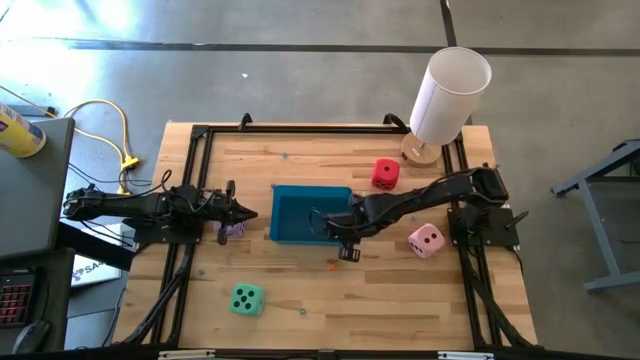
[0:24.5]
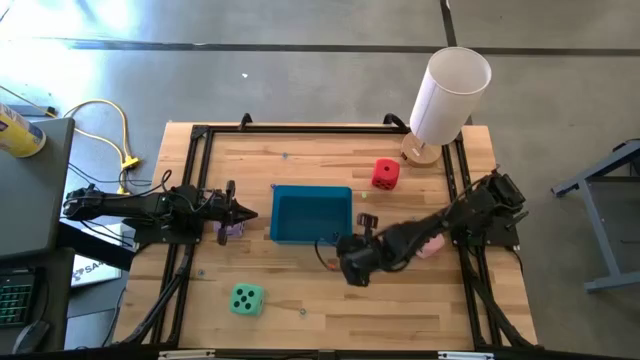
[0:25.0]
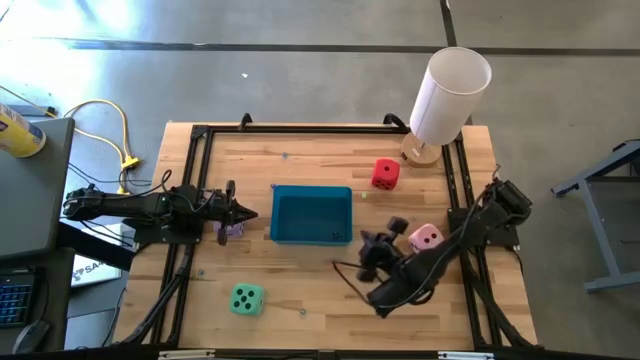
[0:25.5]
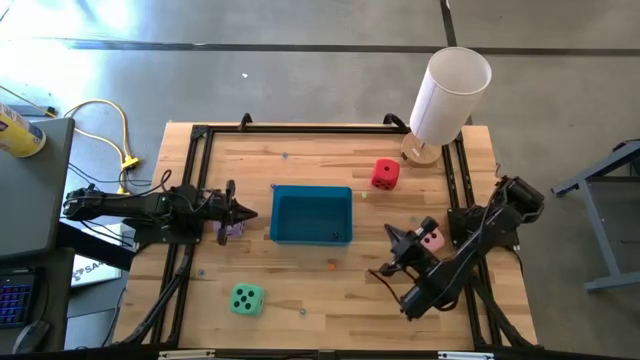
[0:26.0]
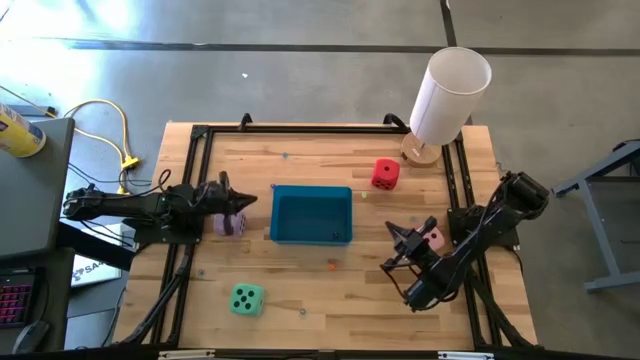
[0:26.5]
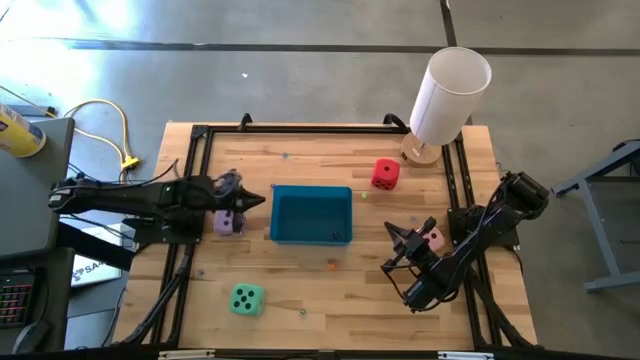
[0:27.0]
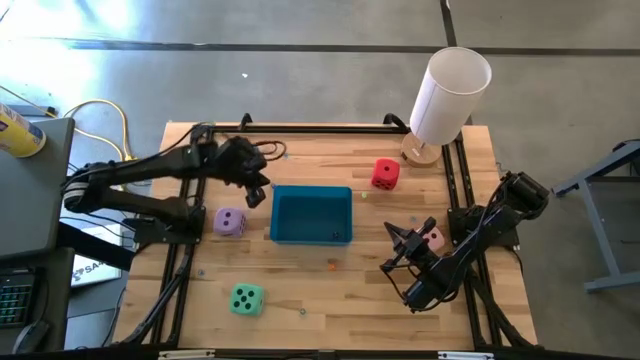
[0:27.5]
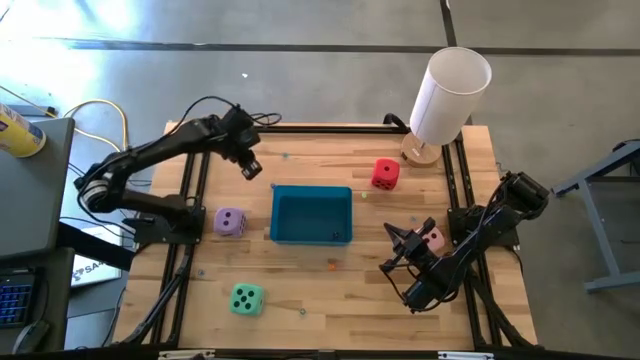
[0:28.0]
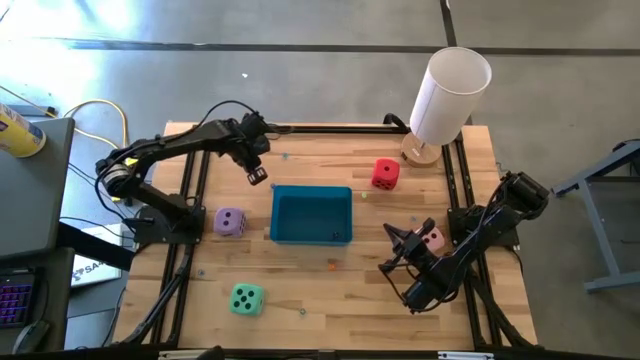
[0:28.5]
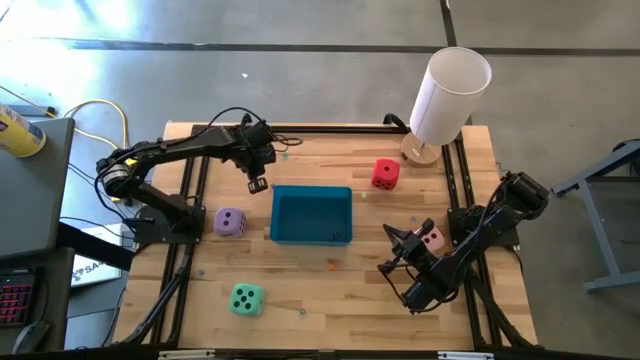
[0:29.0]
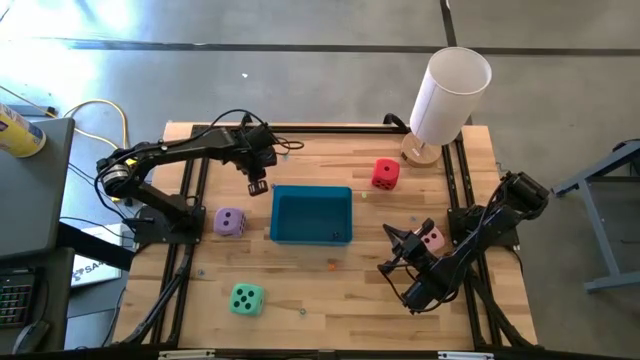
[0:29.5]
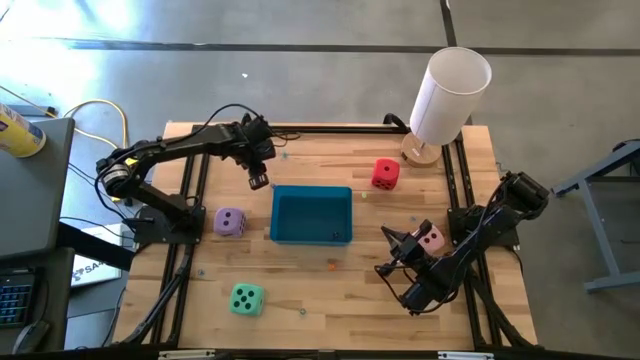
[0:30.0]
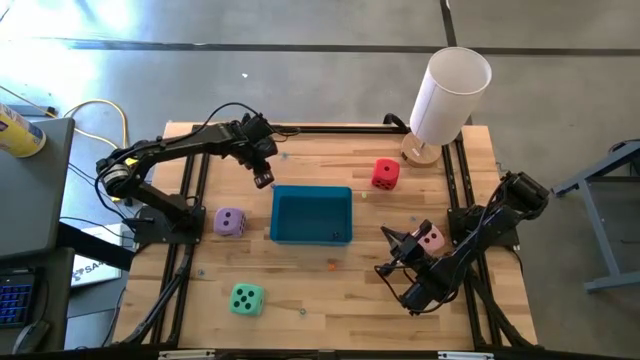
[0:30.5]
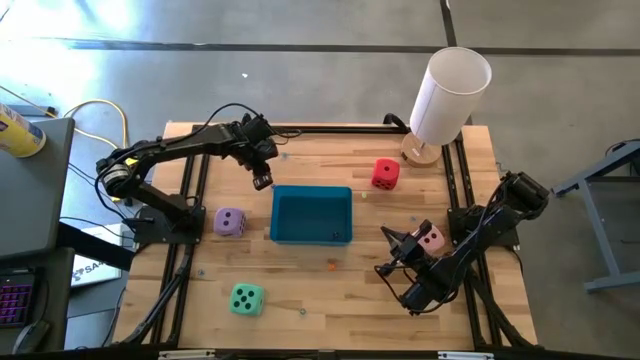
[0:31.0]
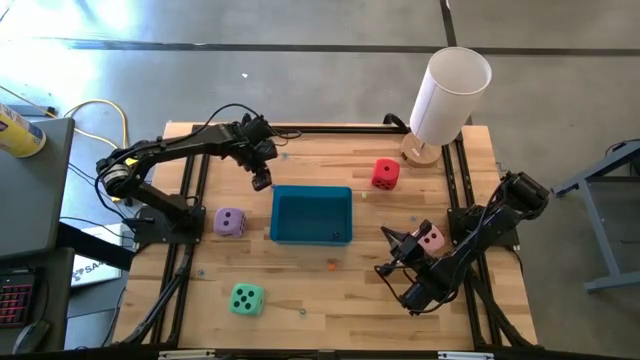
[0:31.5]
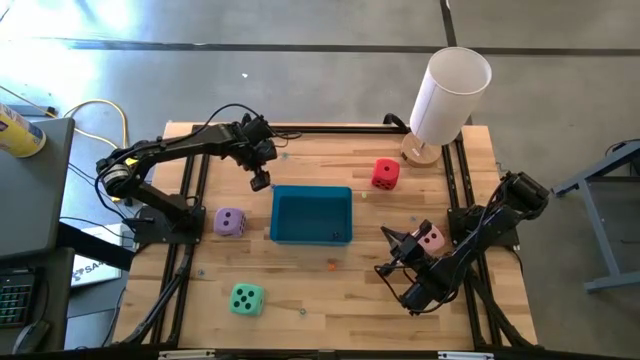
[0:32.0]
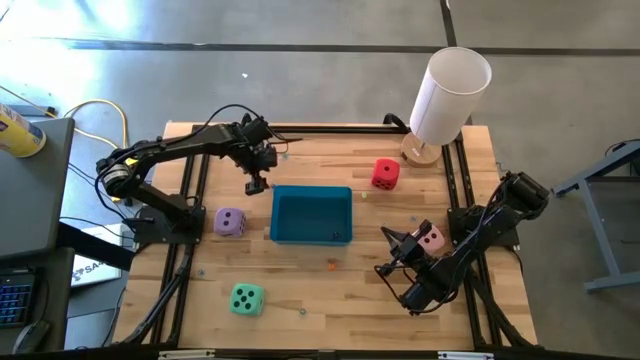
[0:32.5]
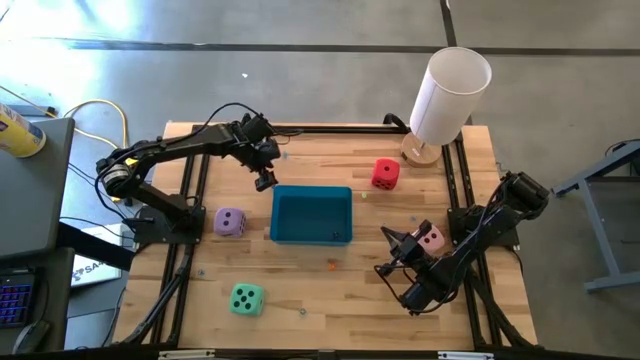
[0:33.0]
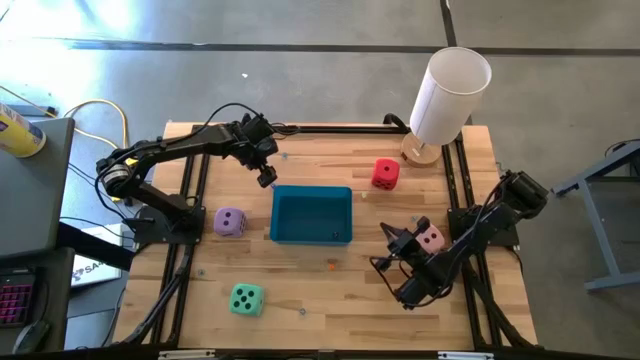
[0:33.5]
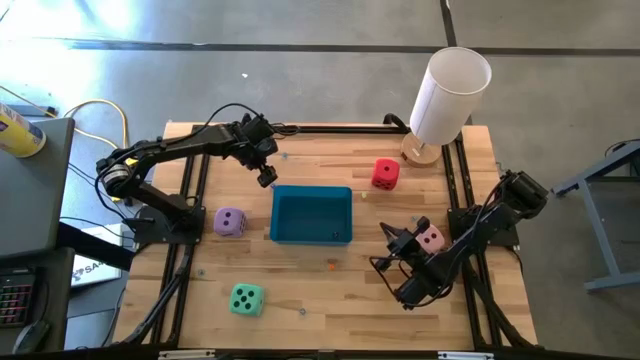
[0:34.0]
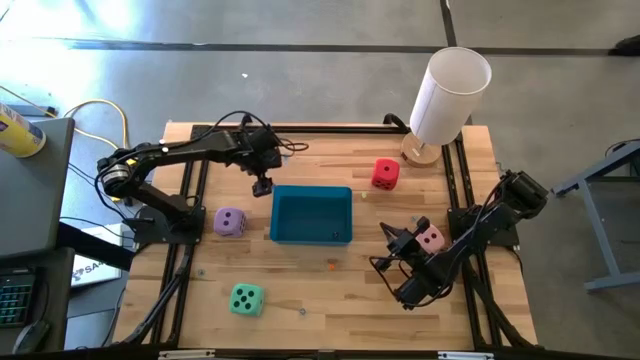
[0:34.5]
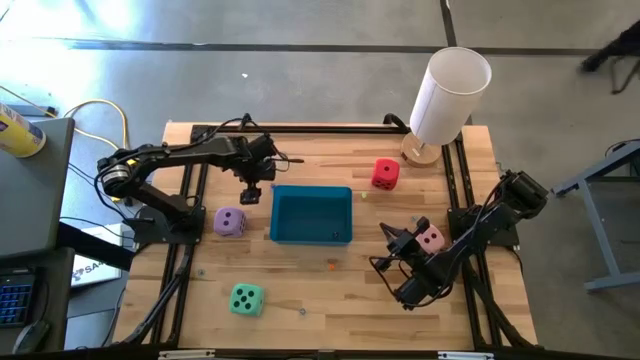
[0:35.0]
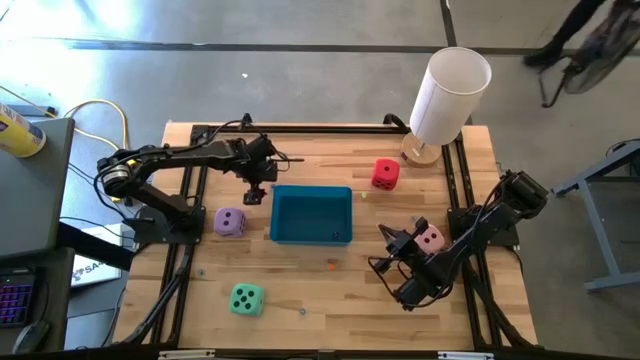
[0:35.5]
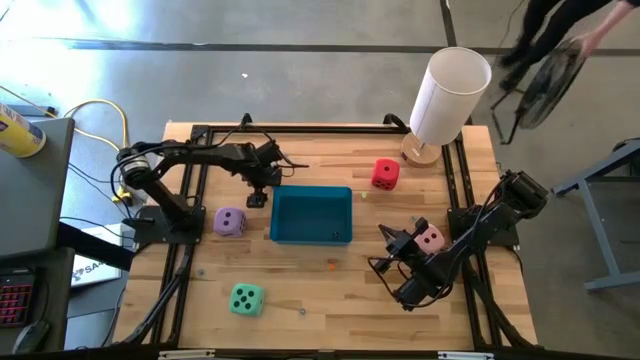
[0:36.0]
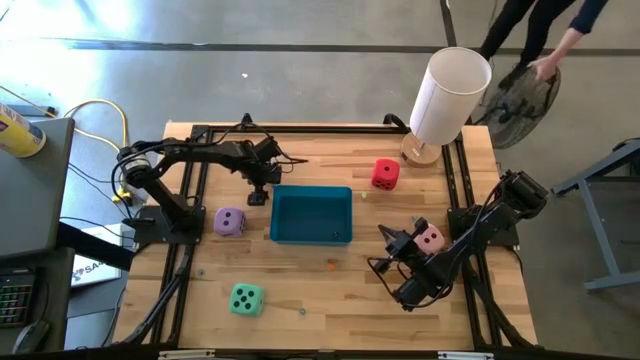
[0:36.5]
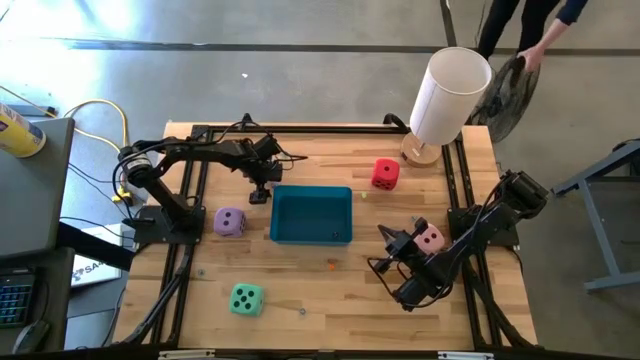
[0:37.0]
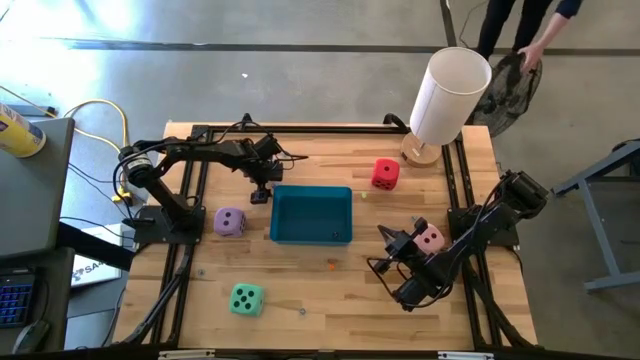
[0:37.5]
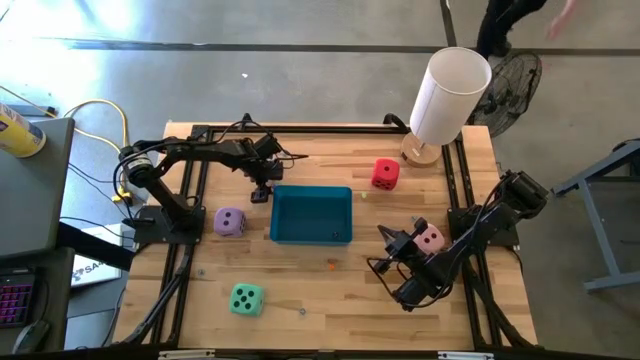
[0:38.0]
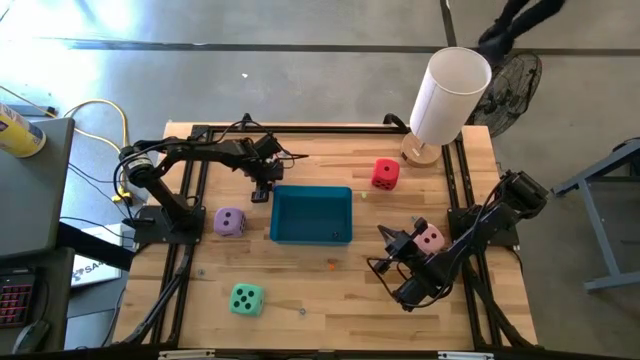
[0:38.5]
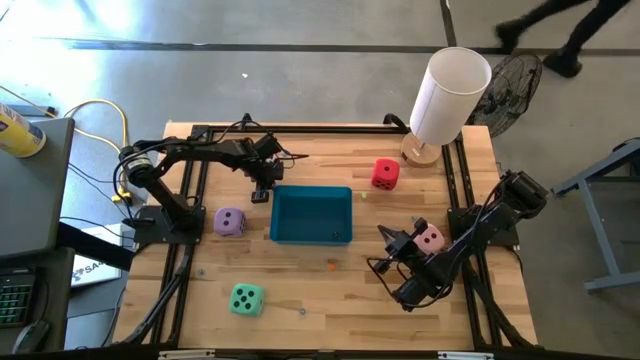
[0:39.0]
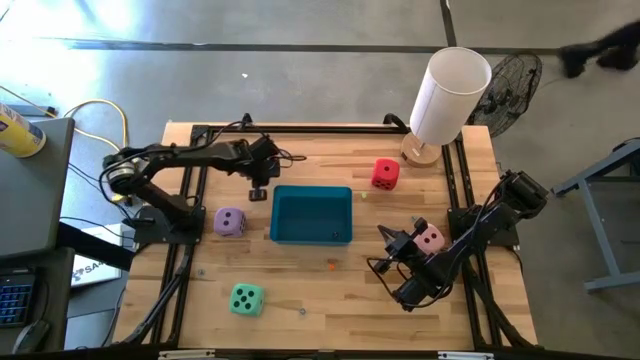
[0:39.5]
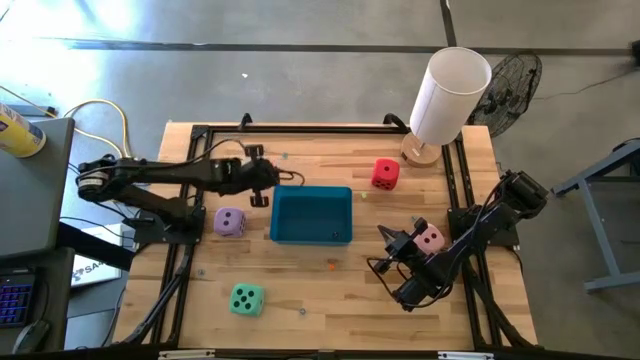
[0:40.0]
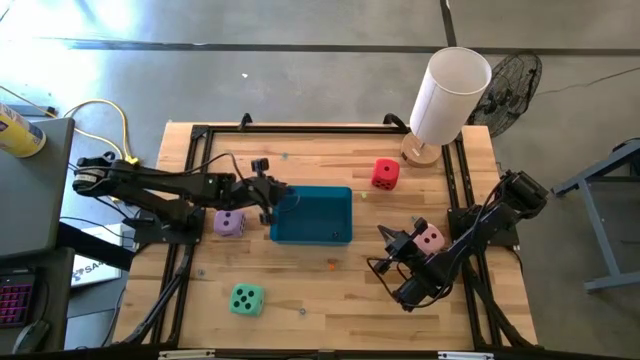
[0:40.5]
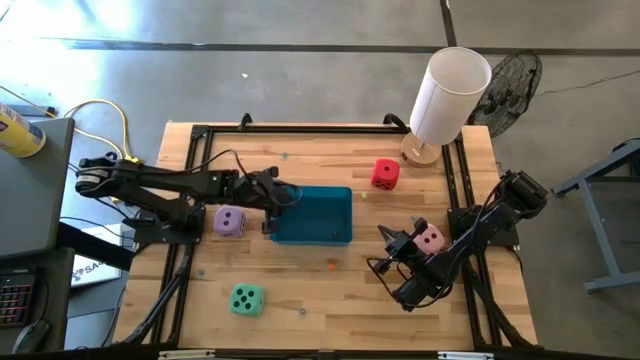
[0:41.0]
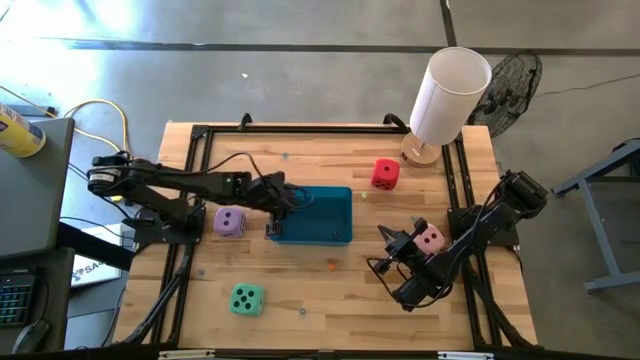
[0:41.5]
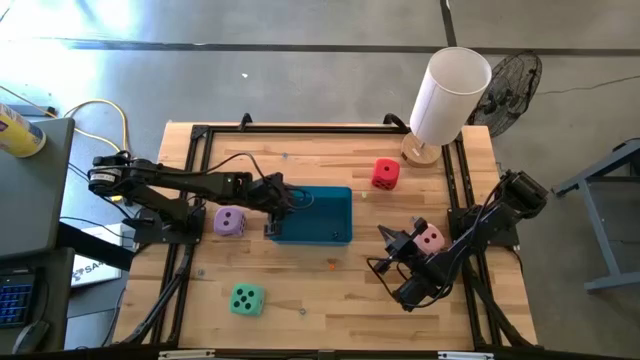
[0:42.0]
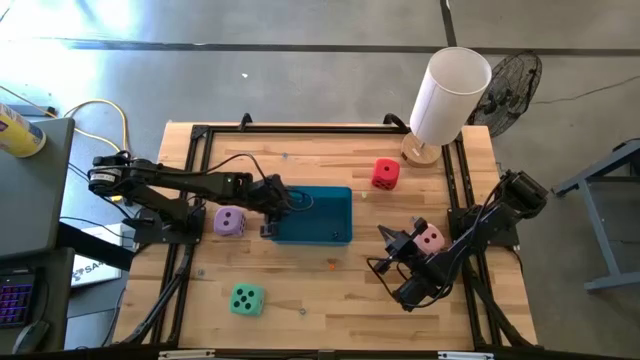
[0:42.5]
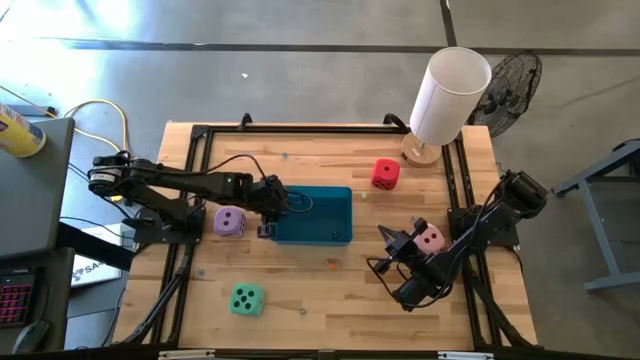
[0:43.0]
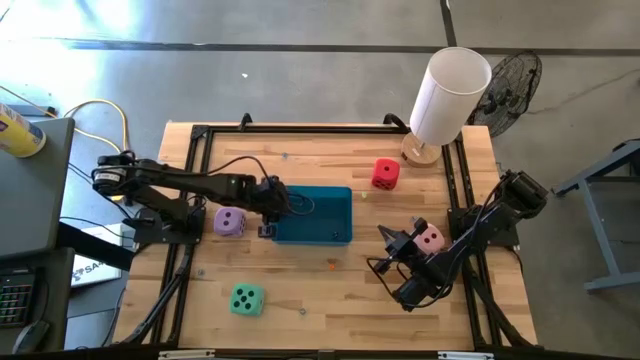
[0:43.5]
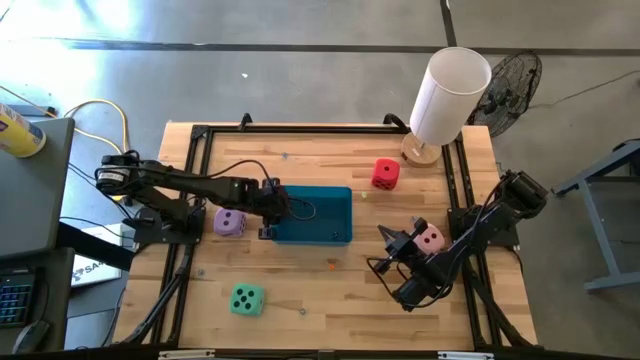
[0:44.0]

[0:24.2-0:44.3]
Task: Pick & Place Dice
Put the small blue dice into the blue bin

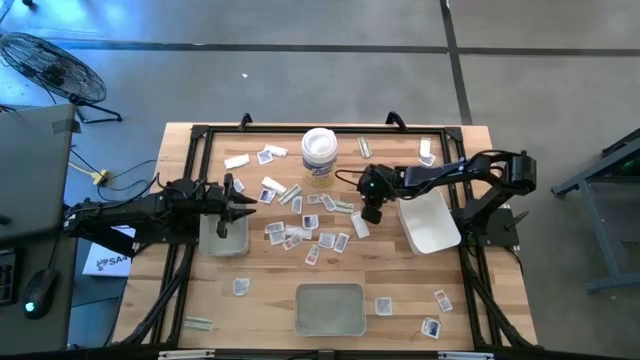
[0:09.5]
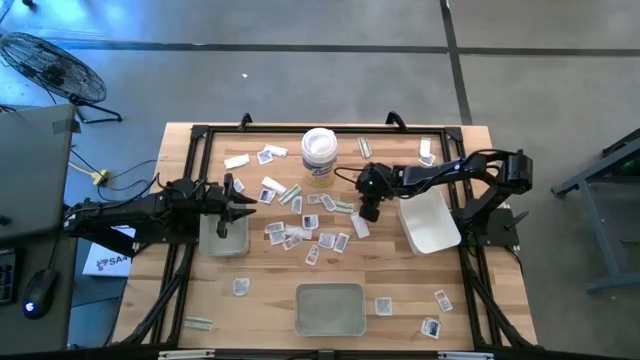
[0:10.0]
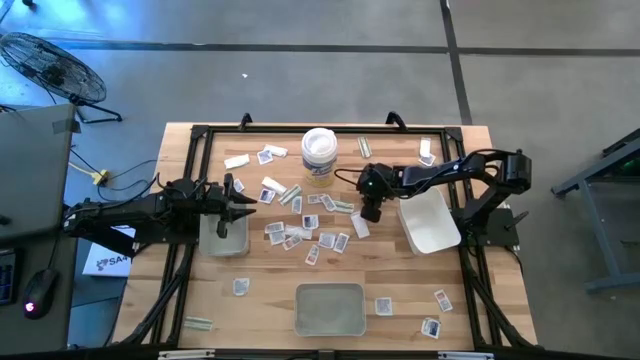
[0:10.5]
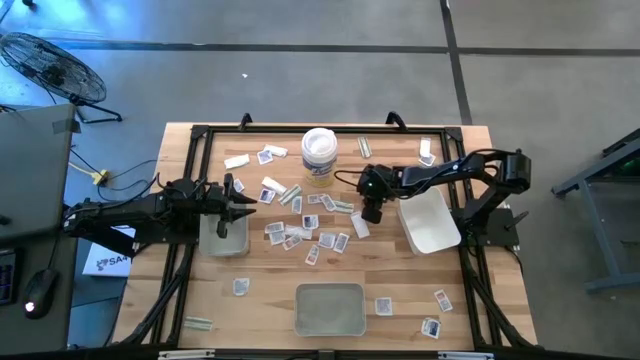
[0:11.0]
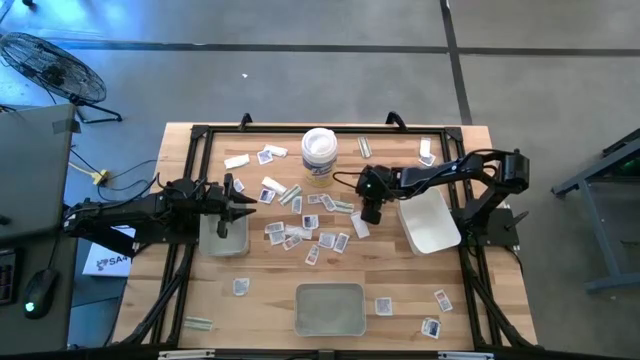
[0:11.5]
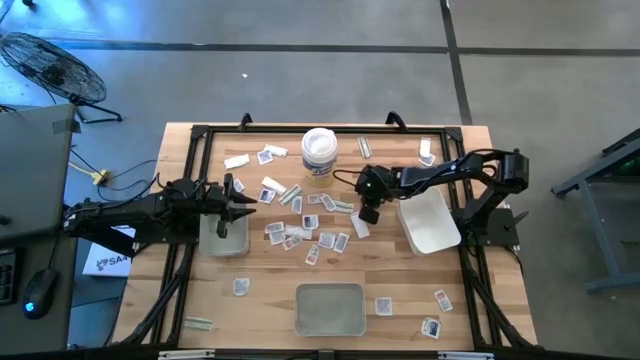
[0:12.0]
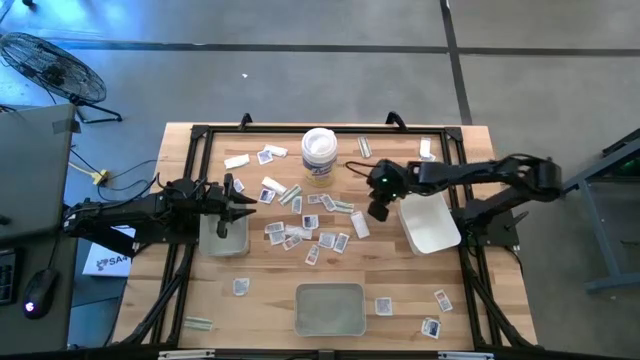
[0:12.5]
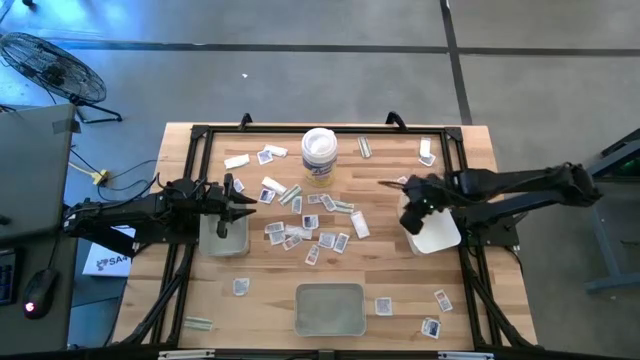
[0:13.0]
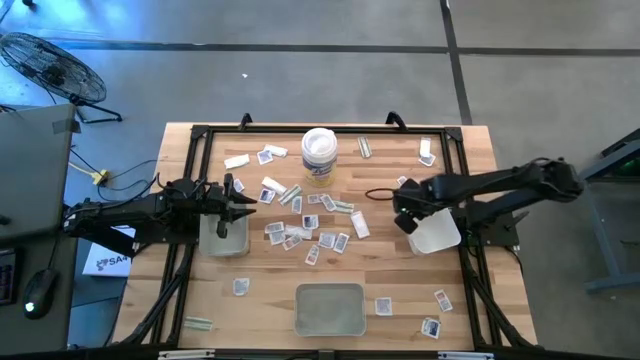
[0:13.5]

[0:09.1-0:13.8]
Task: Pick & Place First Aid Supplies
Put the orange ointment pack into the white bin
